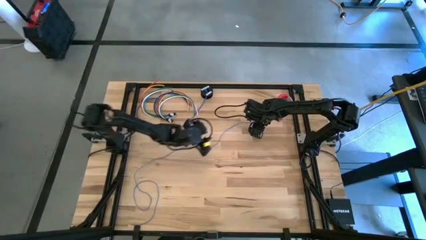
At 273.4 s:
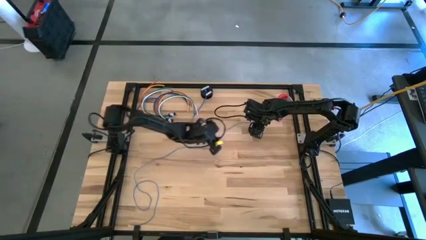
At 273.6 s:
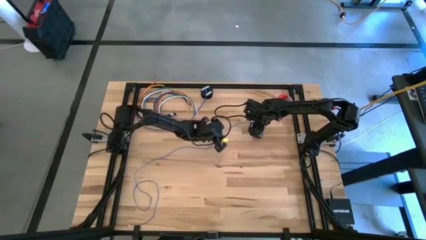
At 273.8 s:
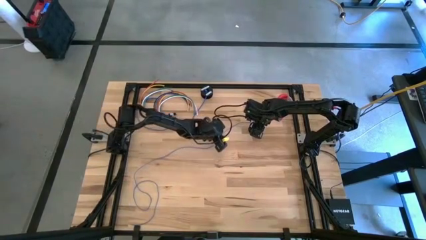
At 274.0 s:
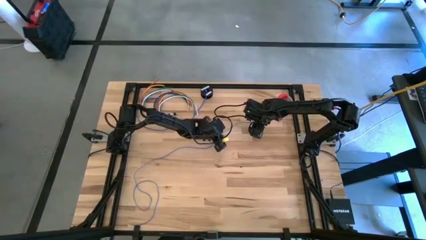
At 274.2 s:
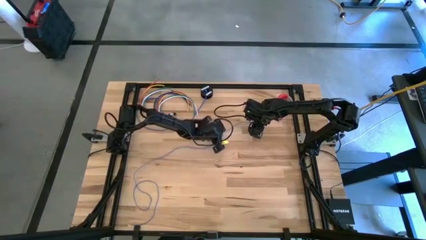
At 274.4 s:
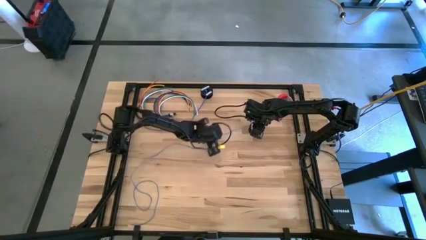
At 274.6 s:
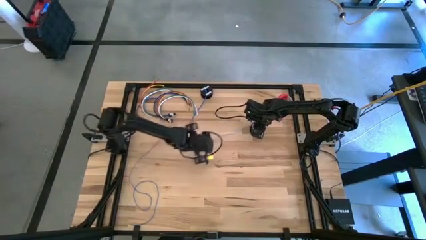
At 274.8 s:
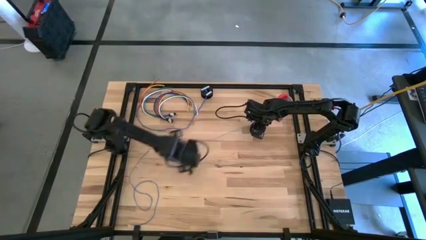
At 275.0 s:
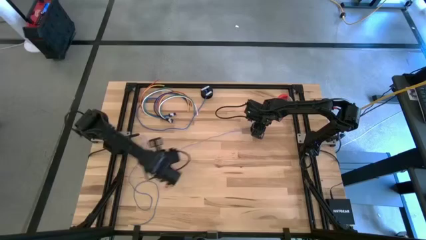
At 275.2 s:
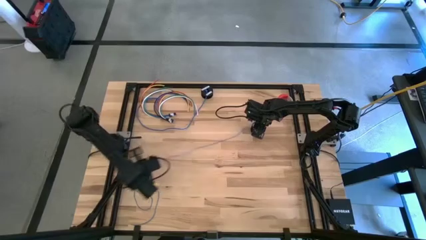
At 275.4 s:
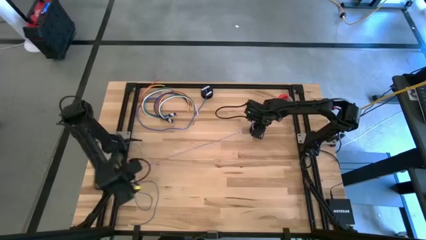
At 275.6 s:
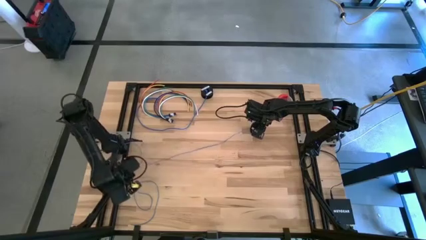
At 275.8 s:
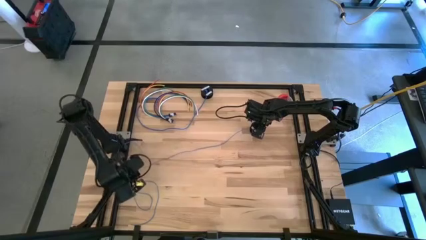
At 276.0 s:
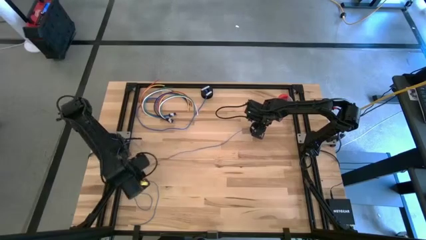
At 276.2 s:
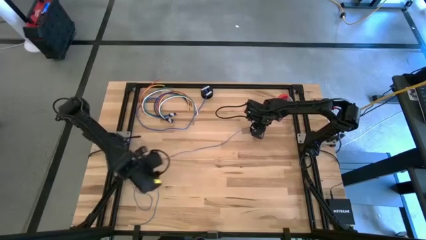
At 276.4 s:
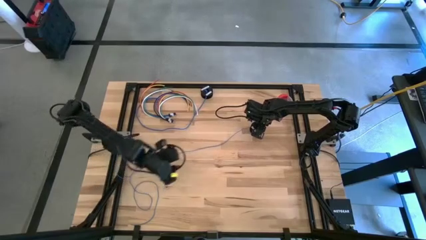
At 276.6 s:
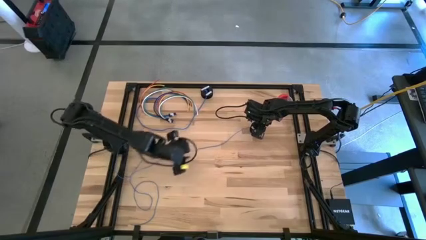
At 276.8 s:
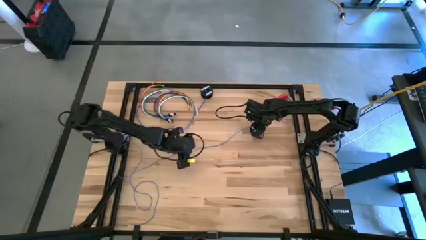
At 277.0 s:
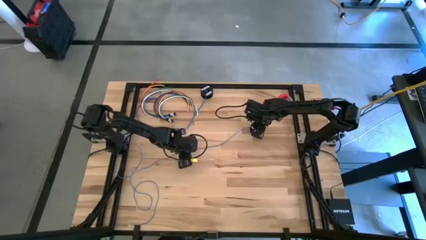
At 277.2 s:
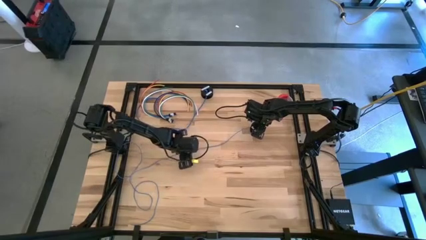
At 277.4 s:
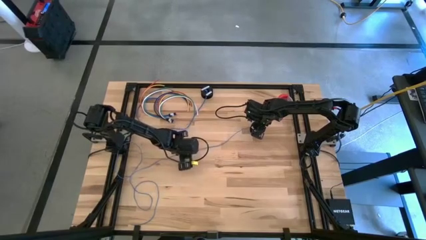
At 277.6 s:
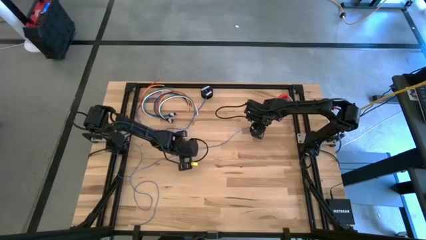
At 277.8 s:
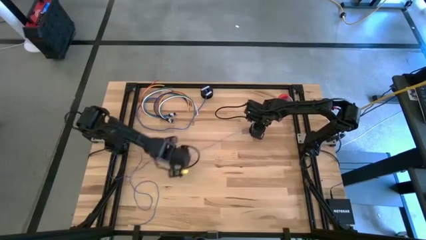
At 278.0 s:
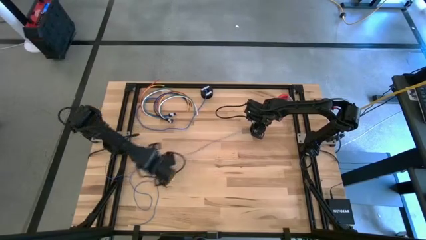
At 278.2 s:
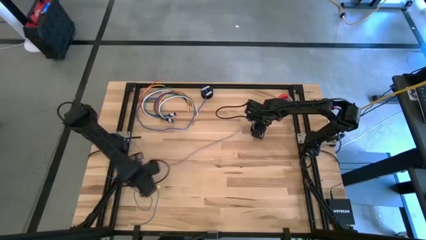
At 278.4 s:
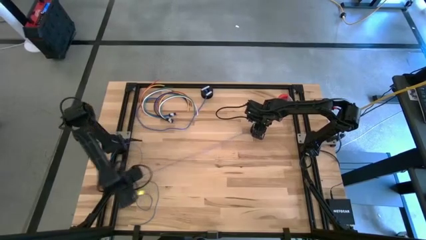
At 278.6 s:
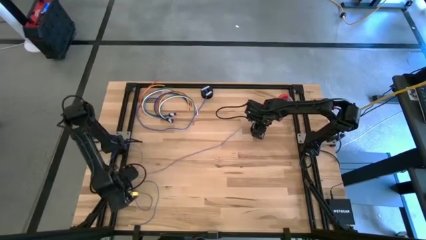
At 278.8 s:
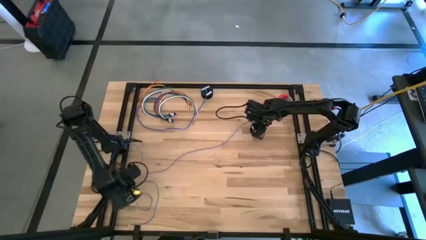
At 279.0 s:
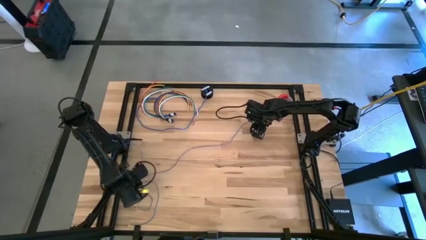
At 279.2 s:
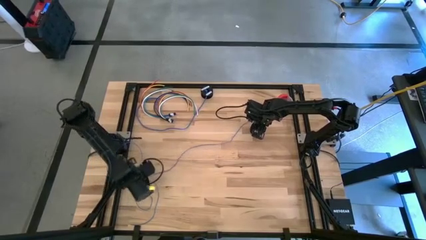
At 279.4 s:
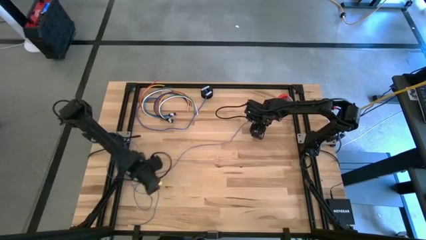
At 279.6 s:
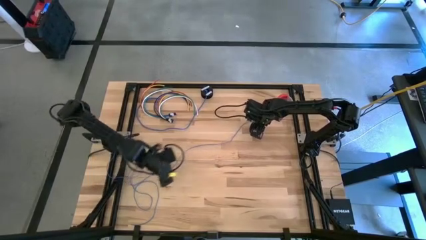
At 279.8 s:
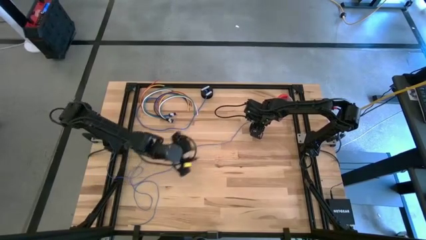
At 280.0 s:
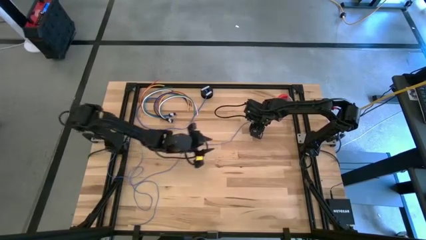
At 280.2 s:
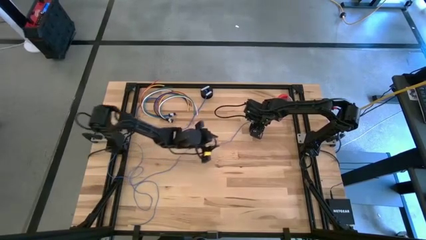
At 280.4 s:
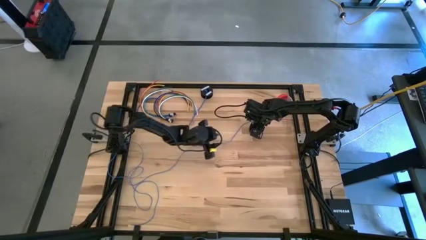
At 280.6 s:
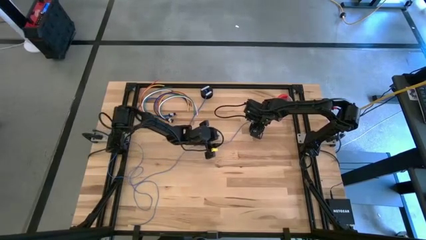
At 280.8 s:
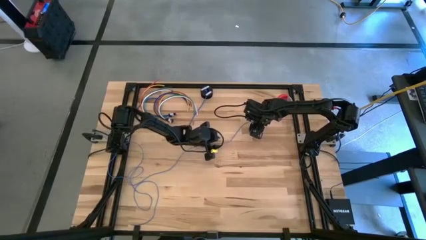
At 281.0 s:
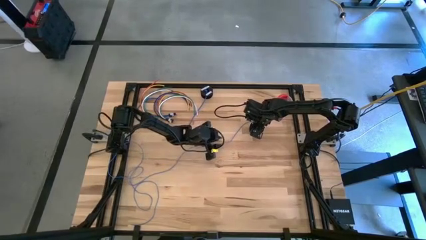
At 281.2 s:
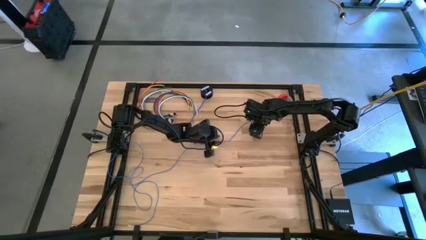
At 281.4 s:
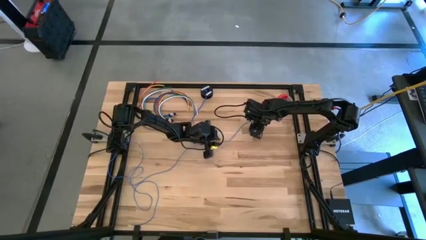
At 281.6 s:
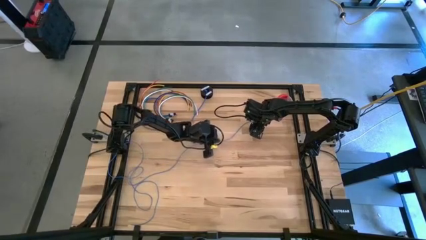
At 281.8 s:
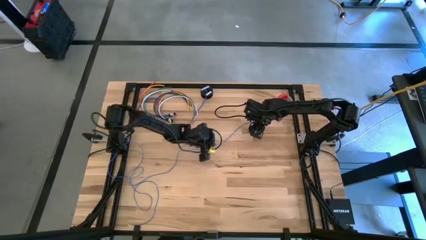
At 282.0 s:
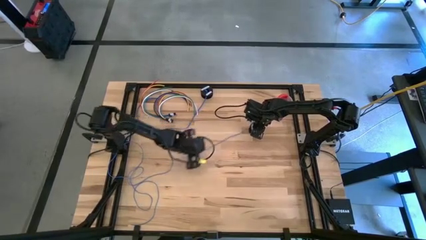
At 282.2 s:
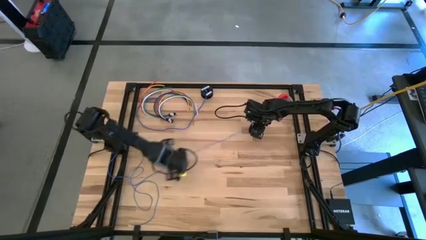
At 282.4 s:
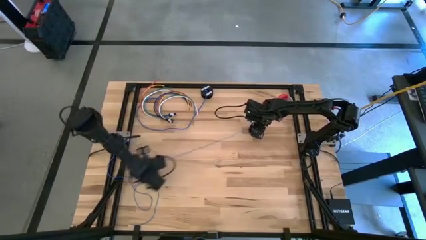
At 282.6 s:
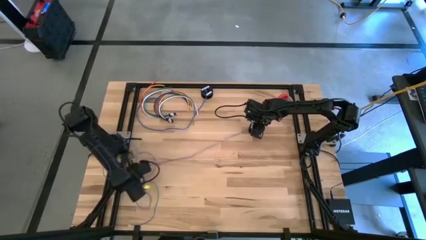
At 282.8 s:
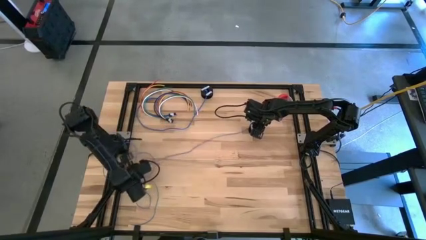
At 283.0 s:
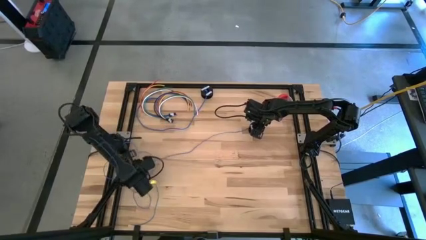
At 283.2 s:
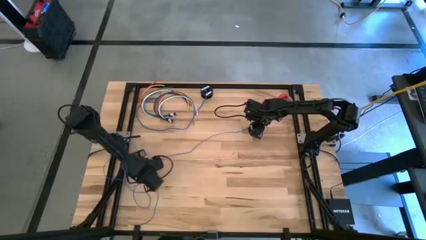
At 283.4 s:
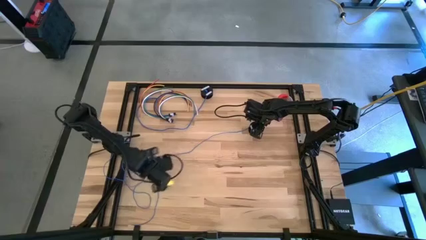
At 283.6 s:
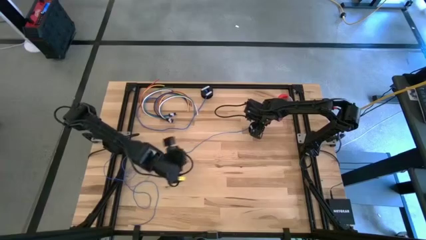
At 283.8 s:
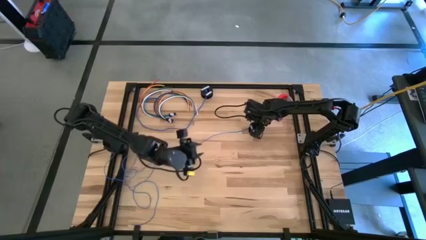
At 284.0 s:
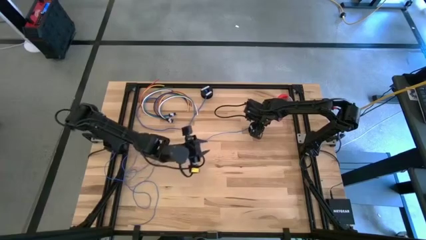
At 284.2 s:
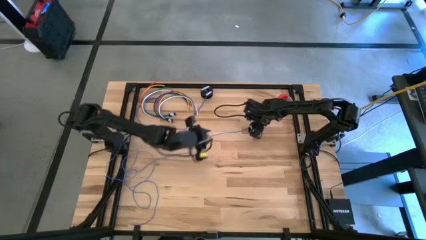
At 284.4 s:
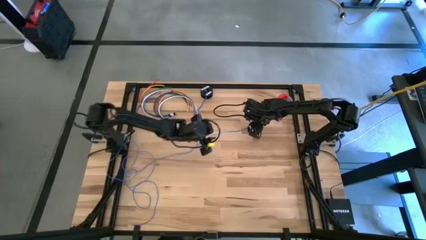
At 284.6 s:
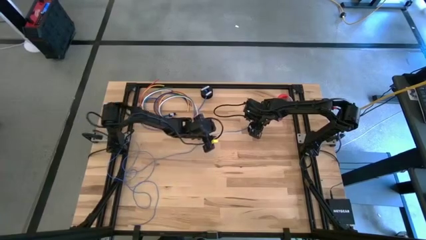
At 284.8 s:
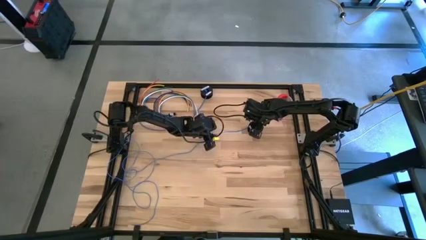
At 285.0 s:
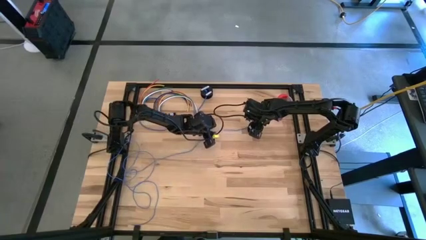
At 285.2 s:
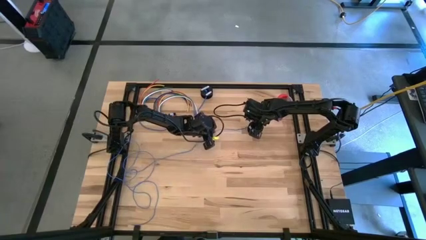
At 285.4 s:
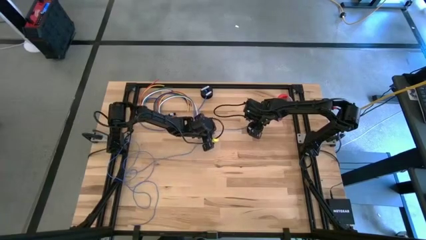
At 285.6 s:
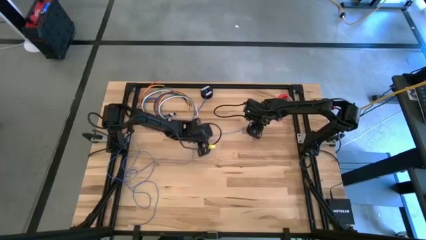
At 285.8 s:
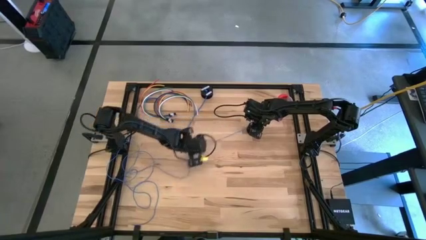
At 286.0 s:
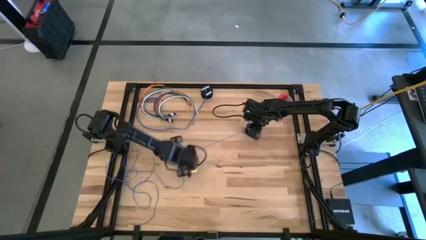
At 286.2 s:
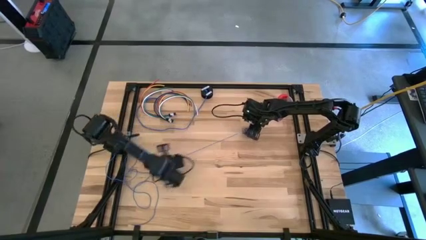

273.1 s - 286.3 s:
Task: Coil cords
Uncoil the blue wire from the black spool
